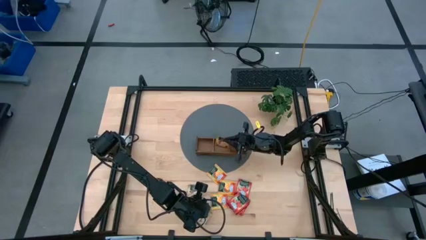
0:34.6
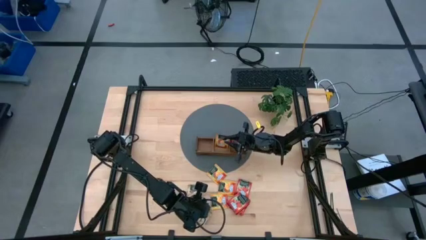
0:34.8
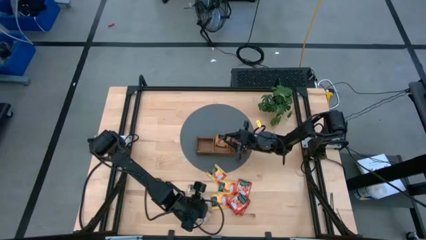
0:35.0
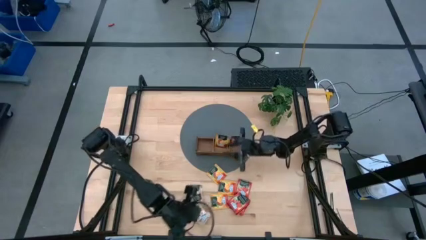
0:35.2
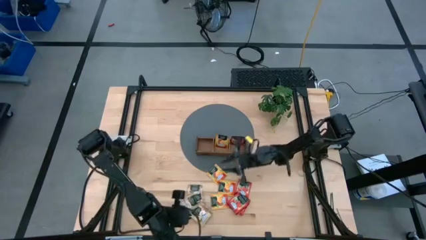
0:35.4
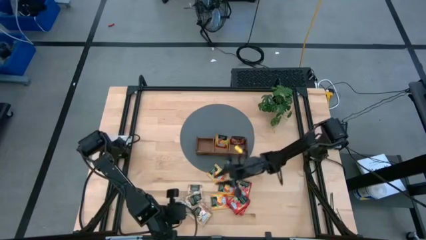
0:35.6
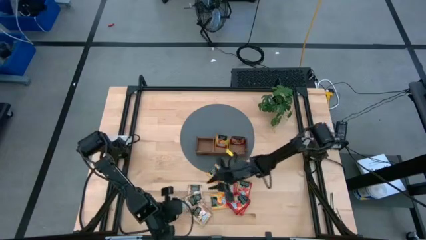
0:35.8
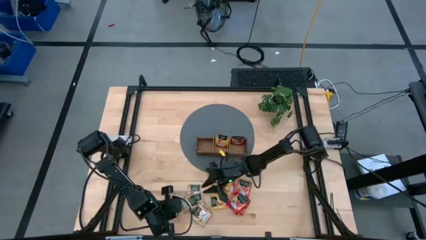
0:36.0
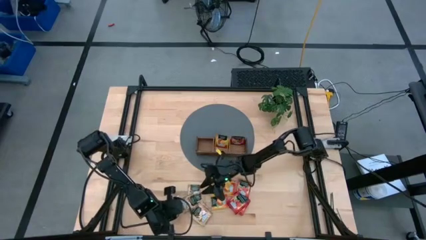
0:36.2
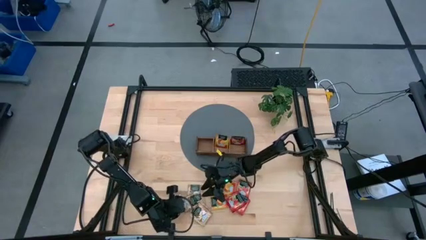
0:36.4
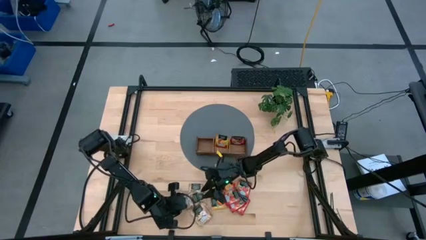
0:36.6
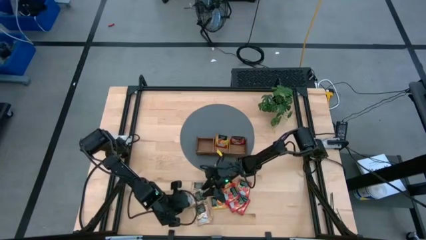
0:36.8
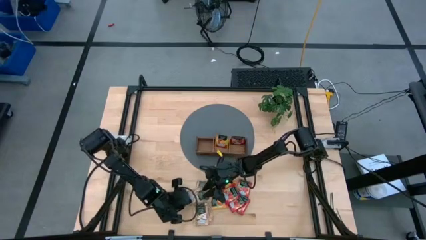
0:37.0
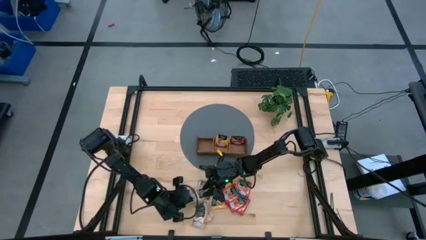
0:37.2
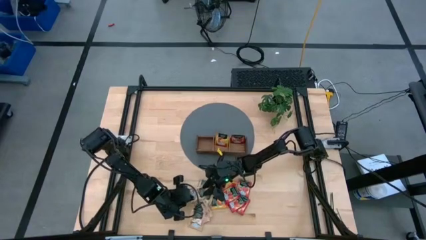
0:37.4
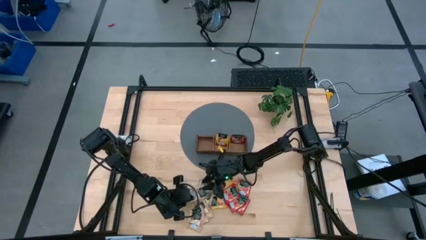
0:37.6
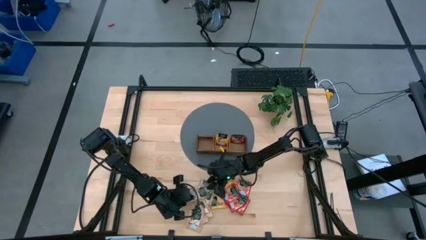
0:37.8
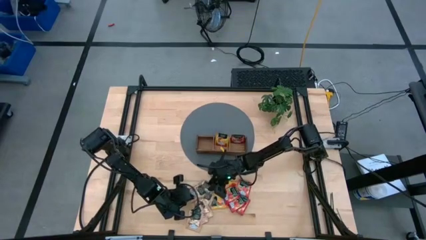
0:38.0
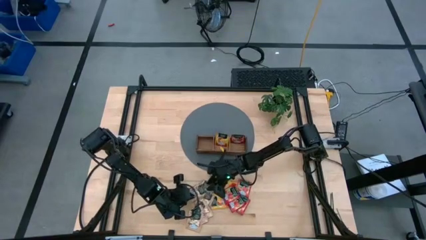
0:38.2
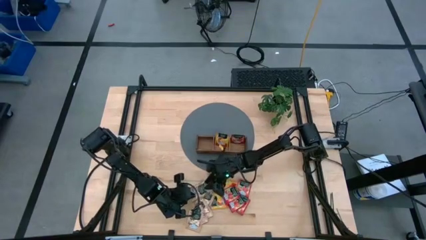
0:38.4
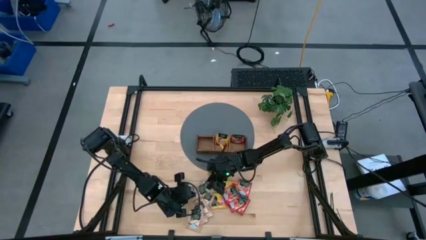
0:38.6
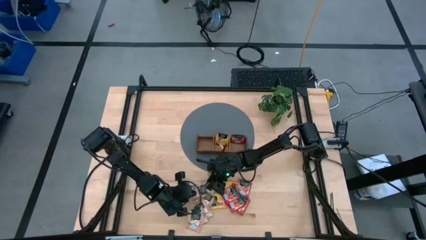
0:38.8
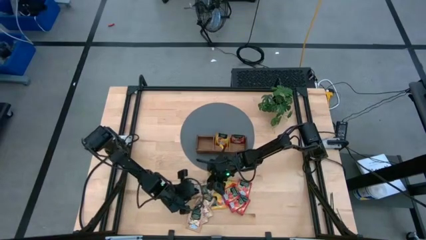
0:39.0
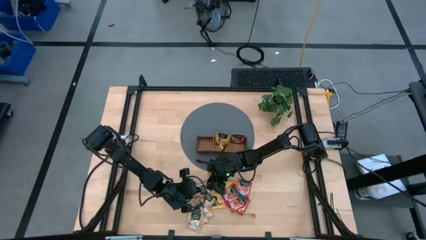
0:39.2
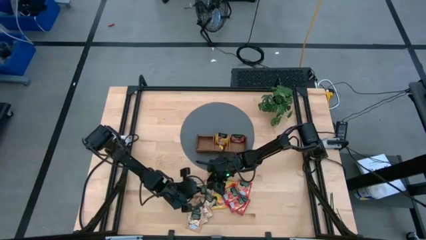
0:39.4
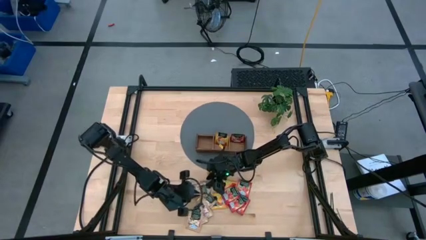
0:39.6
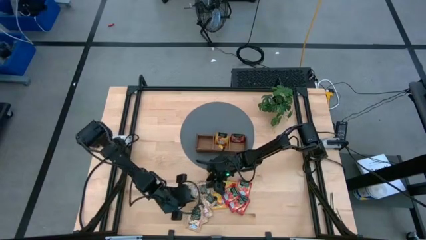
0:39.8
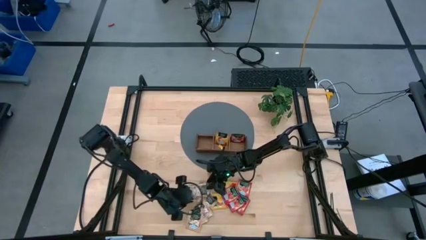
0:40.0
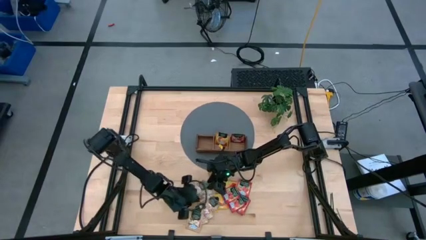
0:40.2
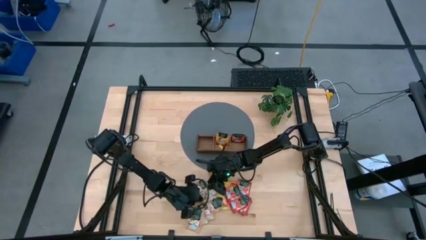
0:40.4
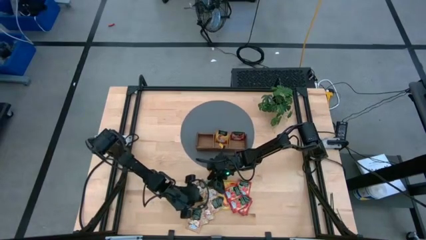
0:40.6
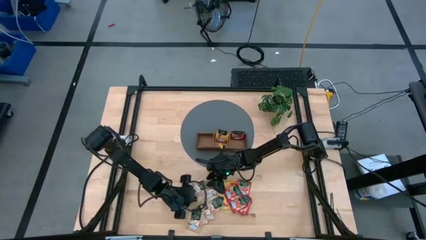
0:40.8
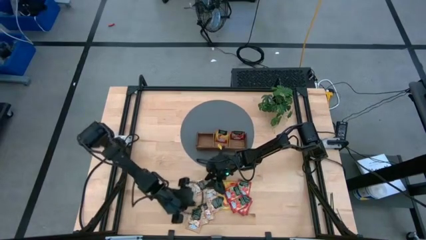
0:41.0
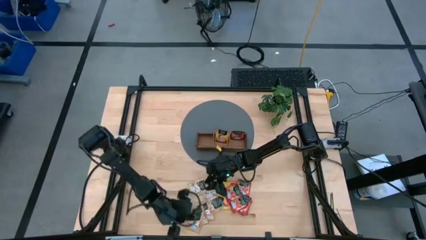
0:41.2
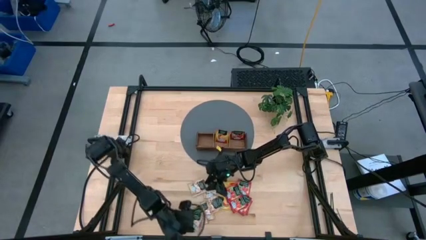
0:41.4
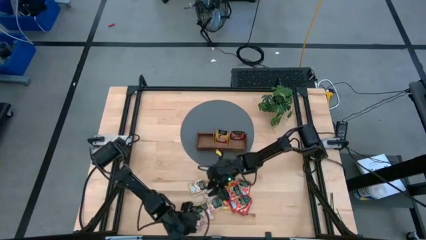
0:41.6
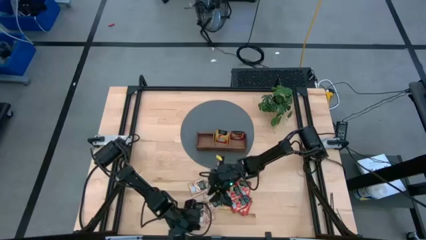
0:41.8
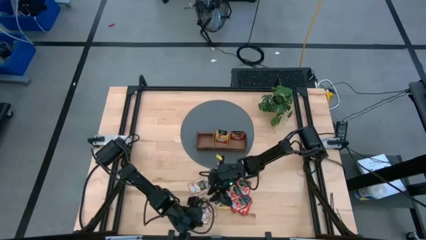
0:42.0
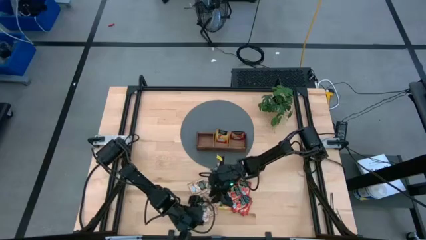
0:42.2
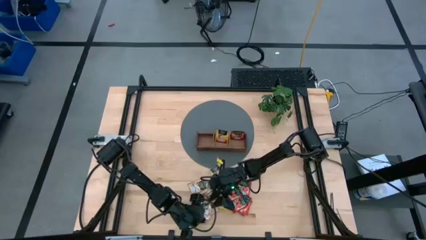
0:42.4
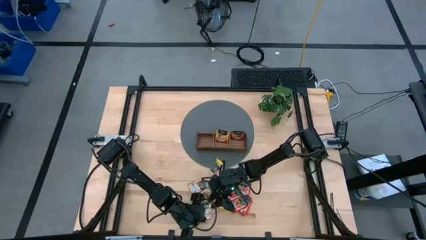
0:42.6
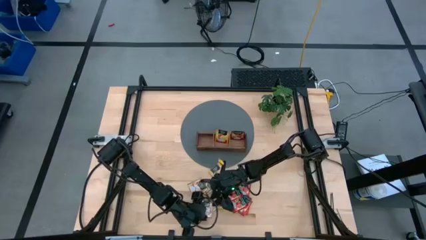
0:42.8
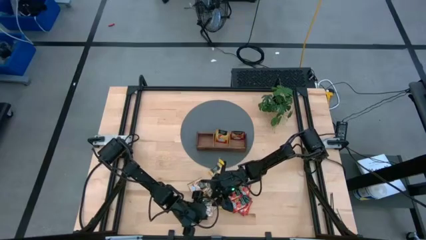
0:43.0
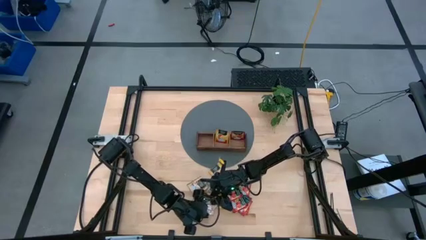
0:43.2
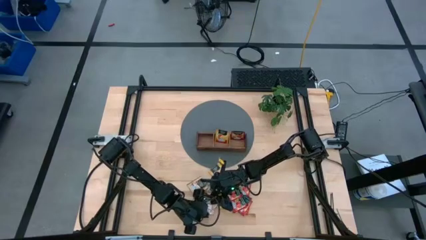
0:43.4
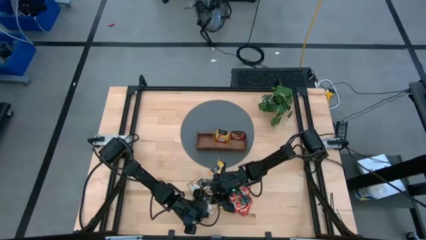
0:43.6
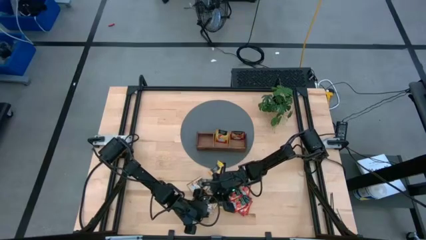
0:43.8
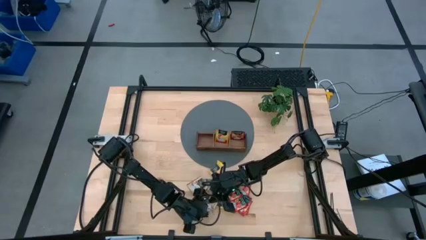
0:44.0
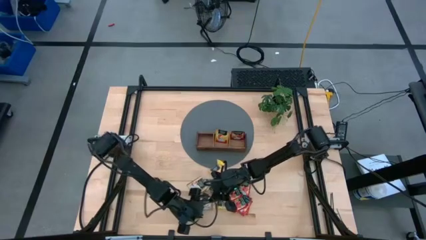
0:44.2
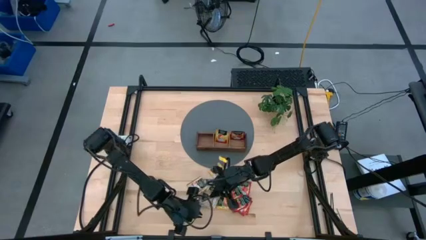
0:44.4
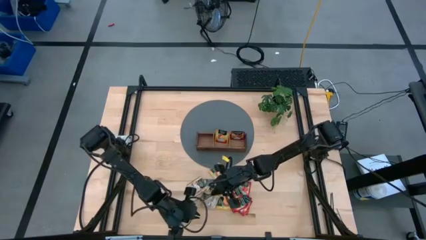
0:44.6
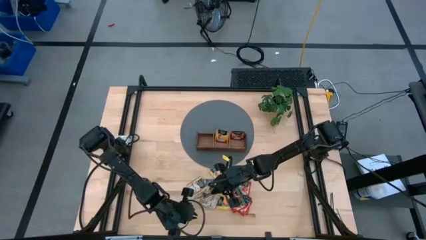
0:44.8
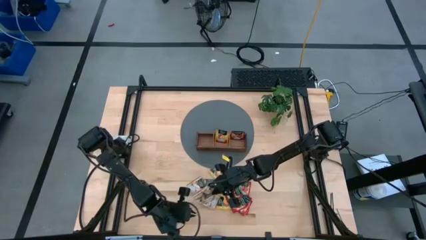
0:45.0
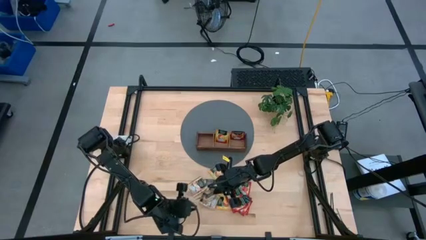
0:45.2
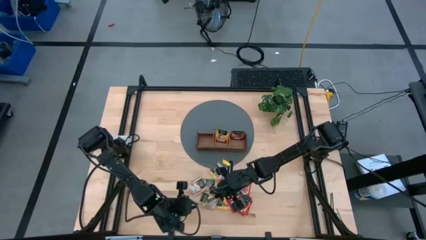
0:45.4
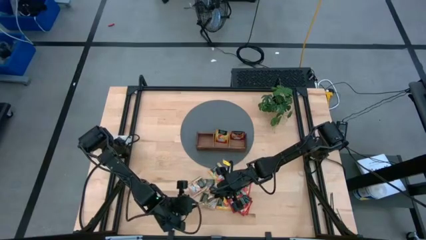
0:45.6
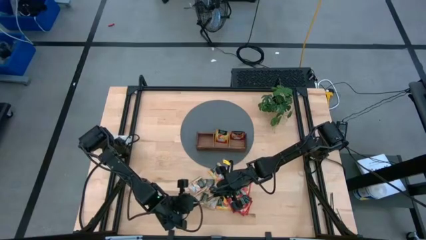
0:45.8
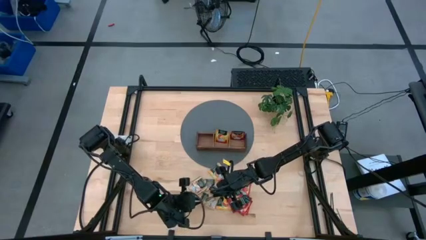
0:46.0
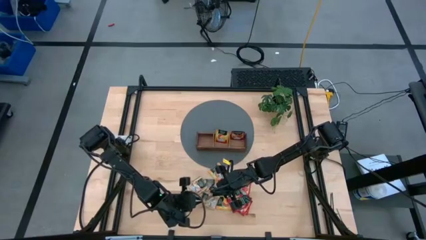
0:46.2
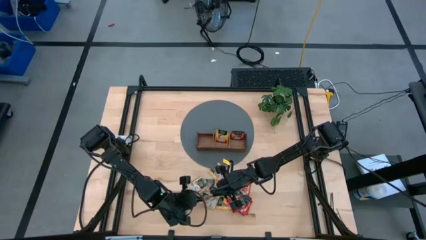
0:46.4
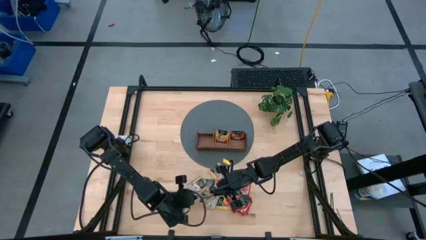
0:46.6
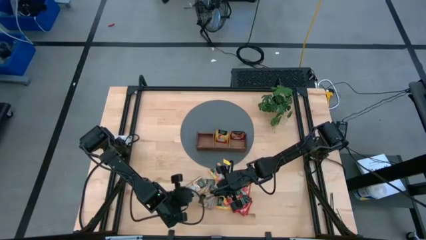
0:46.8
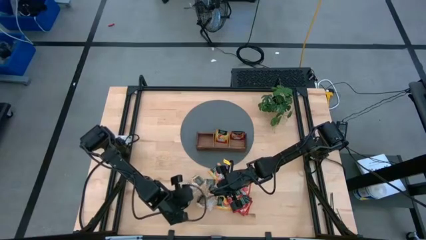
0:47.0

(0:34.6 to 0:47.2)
Task: Pick & Place Tea
Put the brown tea bag into the left section of the wooden organizer
